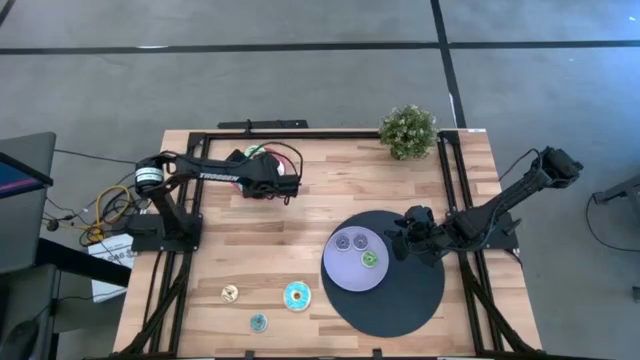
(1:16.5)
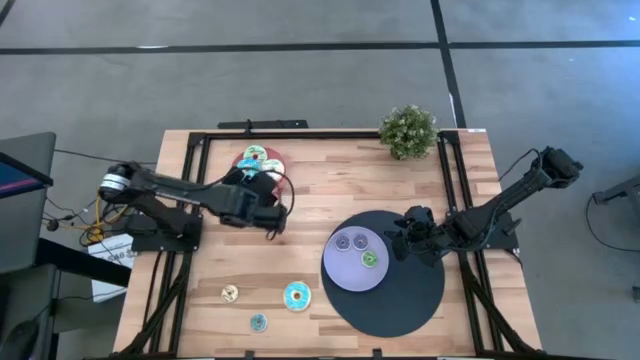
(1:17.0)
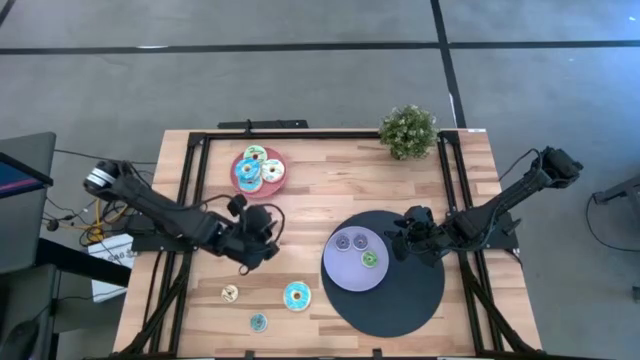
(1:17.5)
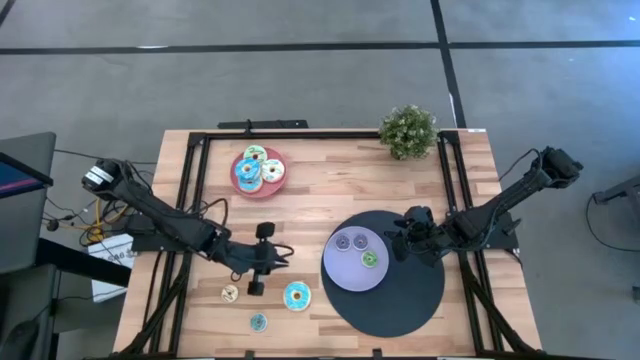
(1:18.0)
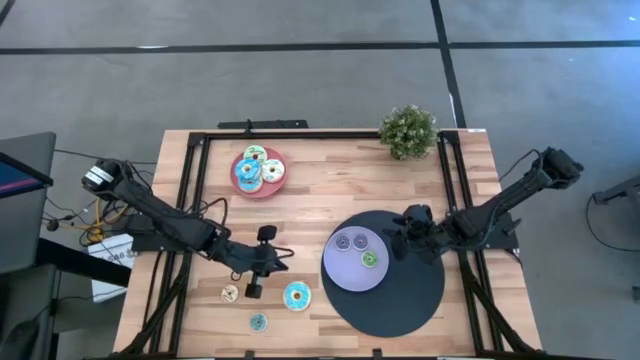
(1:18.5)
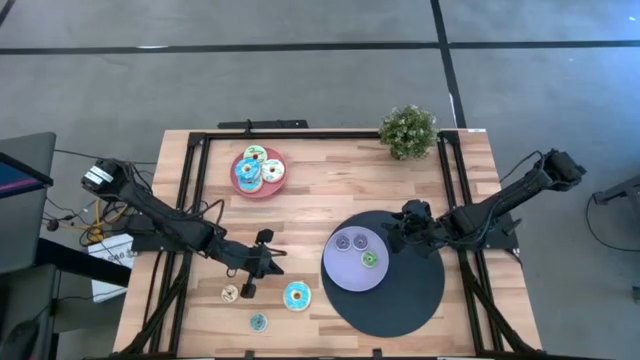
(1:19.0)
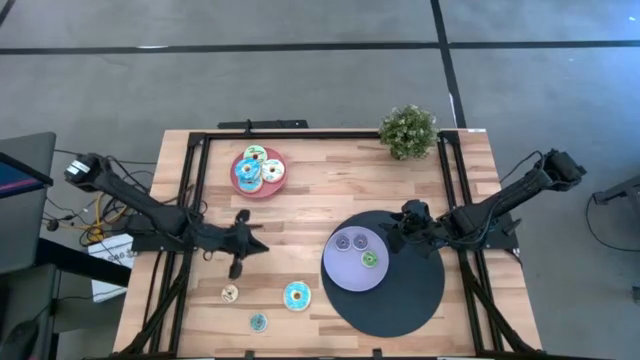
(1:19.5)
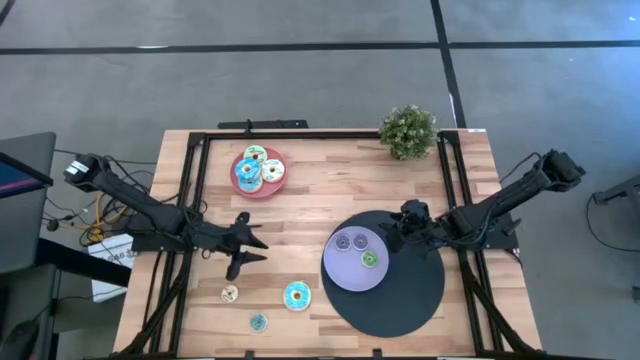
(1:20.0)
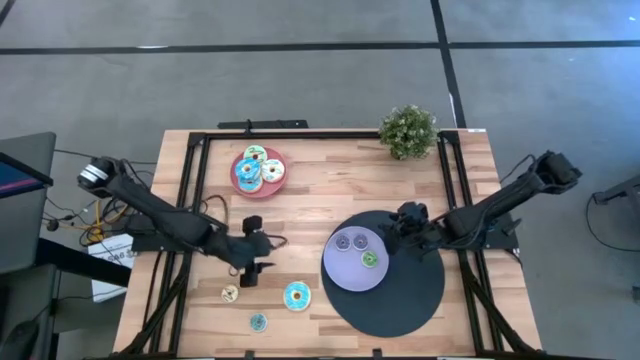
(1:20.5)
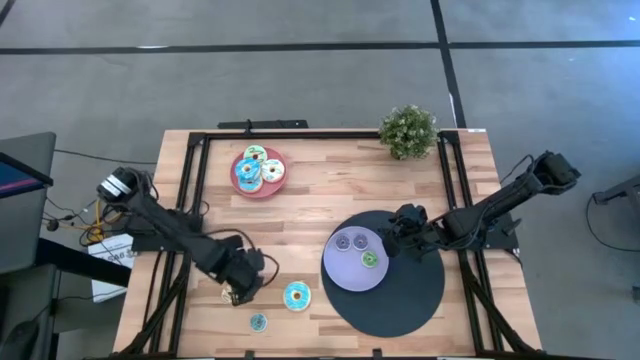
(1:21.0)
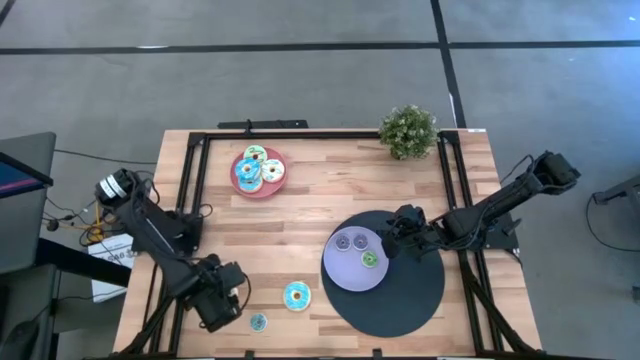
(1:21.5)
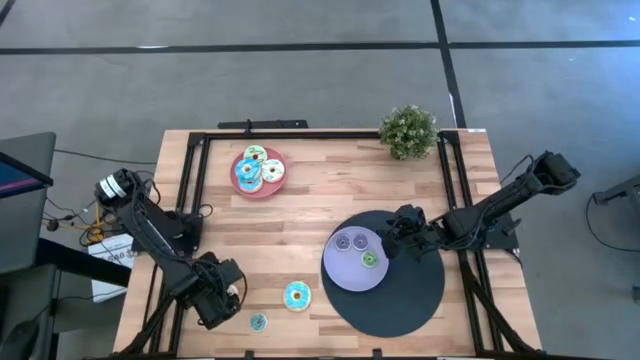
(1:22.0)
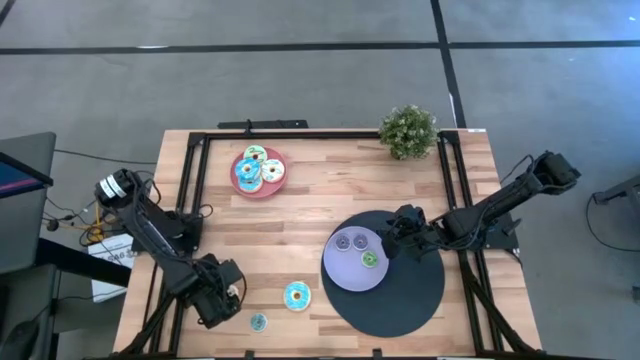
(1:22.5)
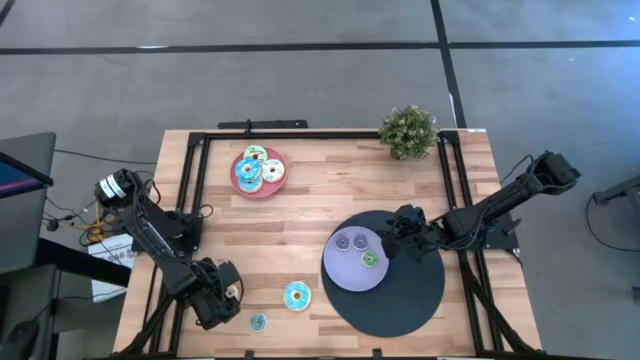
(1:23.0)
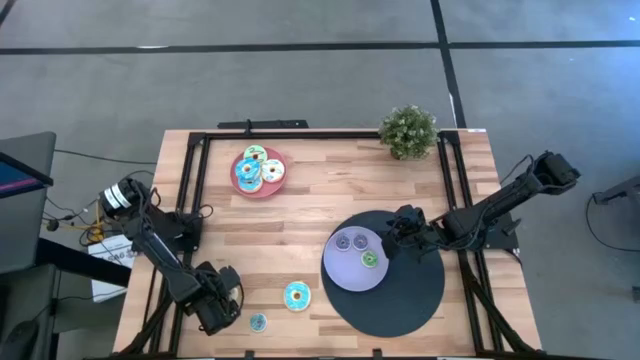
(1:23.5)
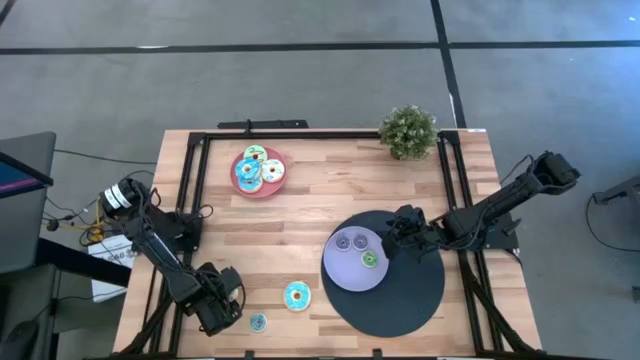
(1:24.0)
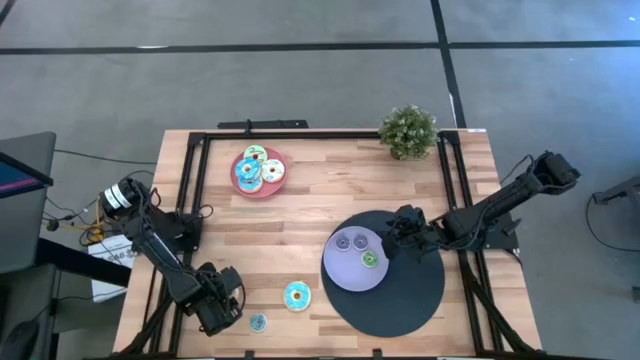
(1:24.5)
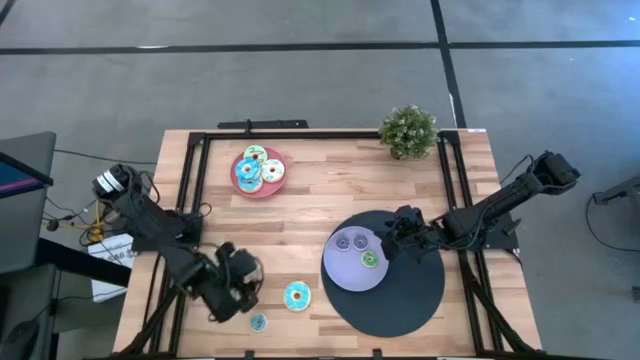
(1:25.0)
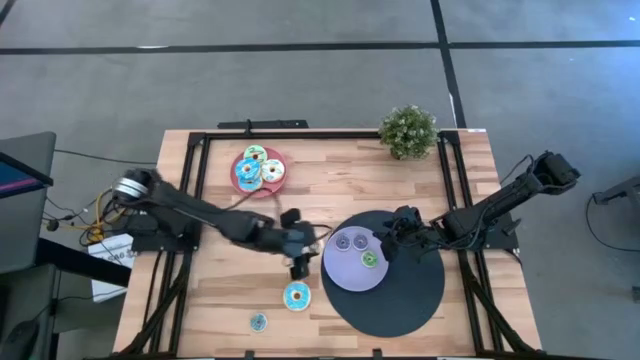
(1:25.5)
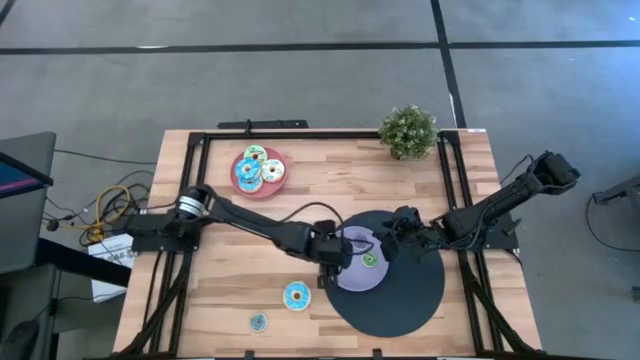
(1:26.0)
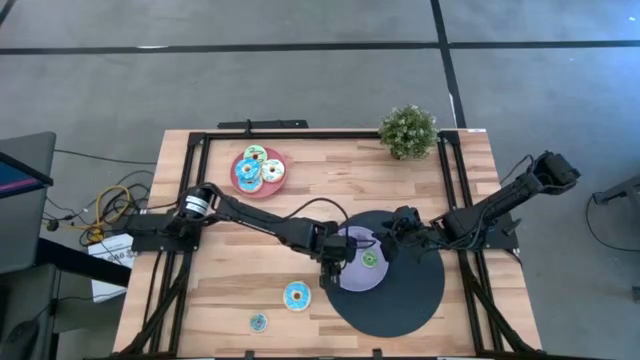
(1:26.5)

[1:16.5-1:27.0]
Task: Pick & Place donuts
Put the small white donut on the purple plate

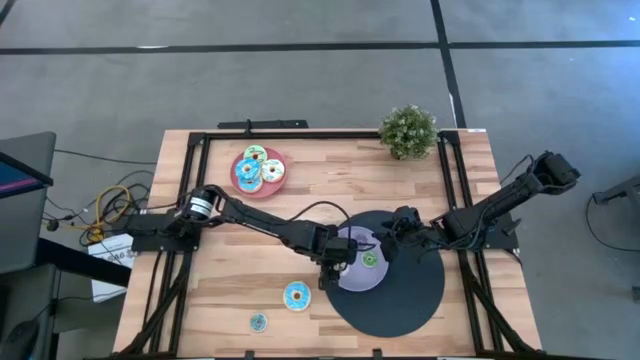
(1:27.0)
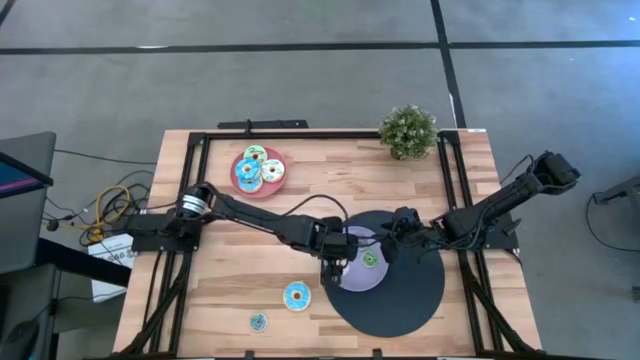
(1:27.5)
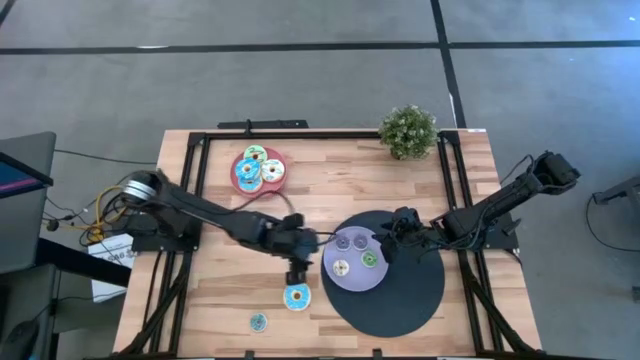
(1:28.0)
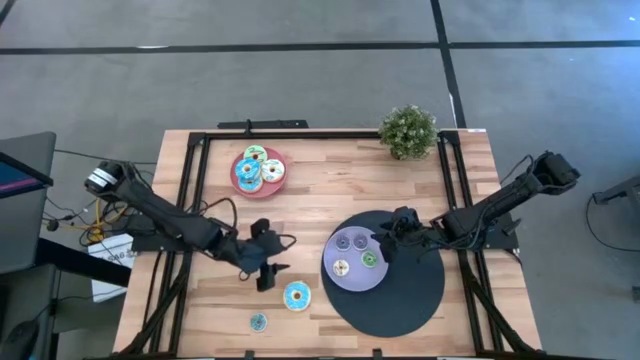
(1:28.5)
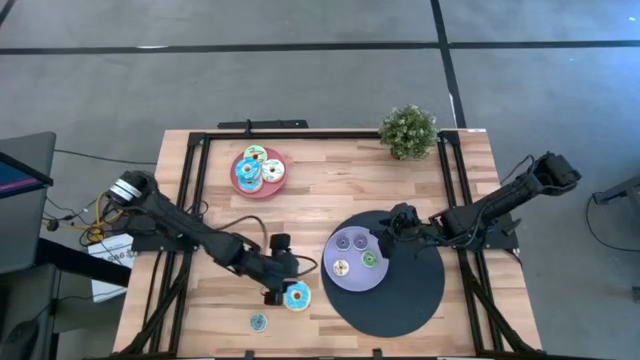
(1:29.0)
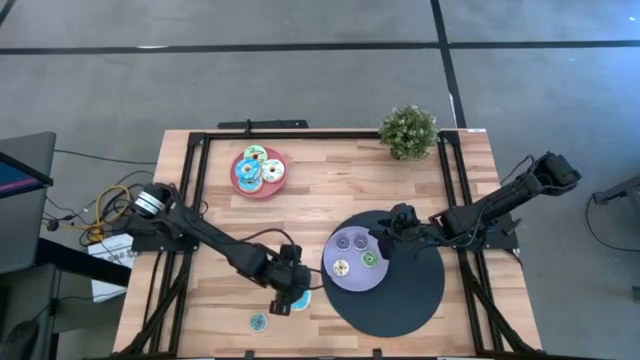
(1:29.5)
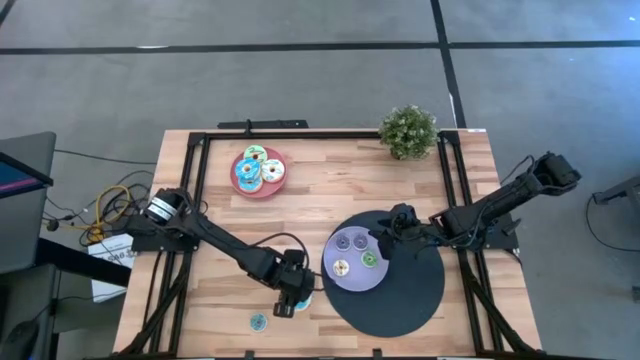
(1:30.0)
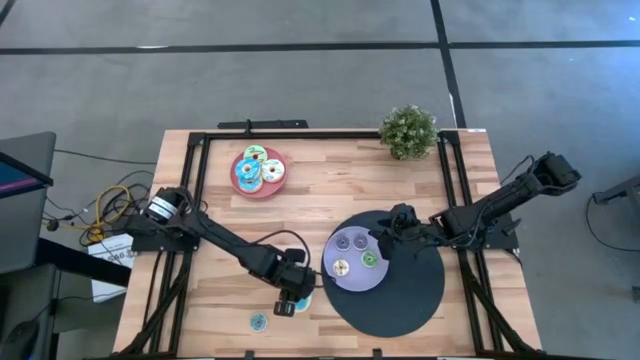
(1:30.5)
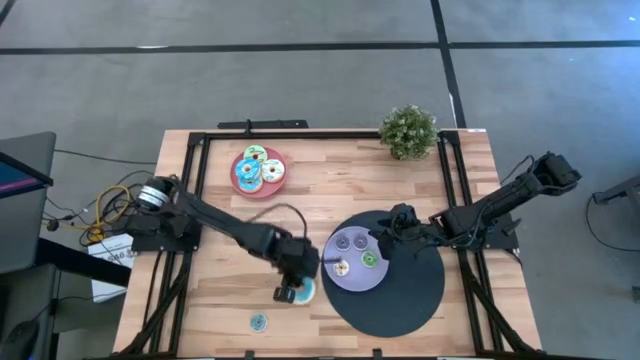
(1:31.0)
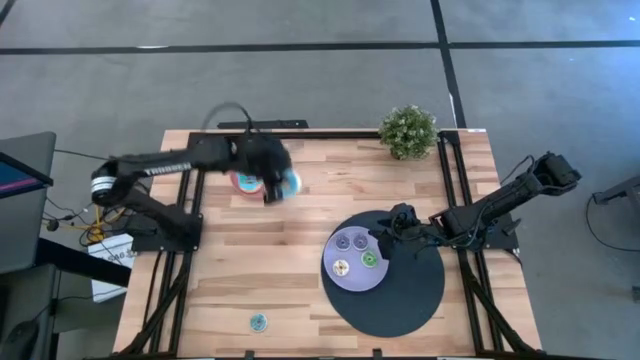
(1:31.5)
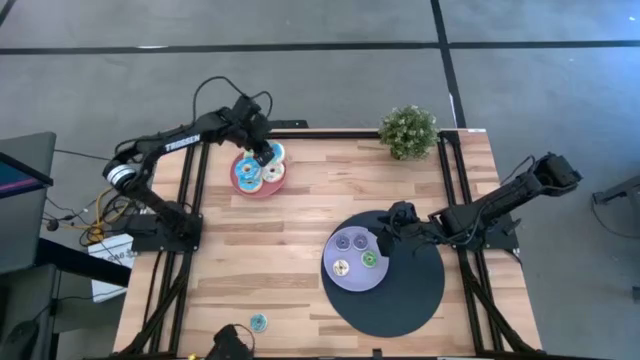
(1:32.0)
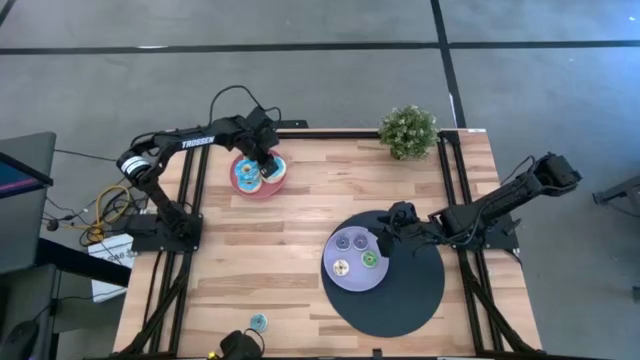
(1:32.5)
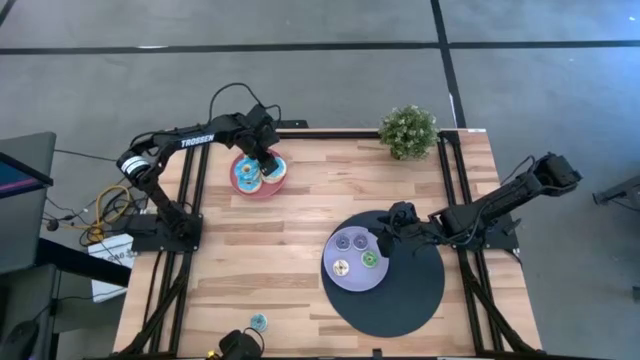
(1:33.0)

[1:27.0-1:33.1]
Put the big blue donut on the pink plate

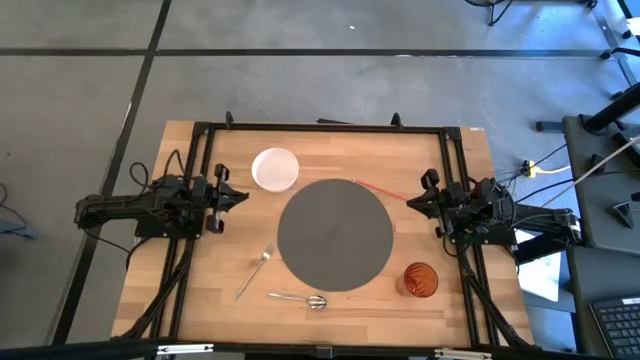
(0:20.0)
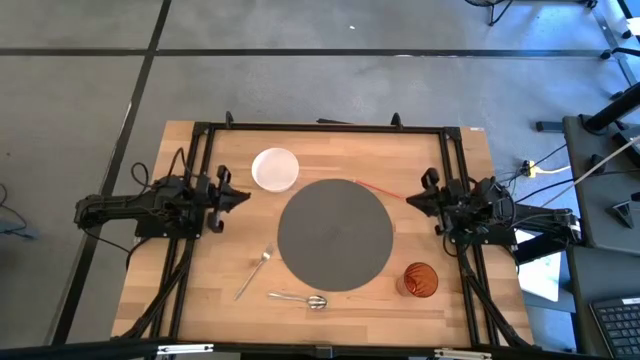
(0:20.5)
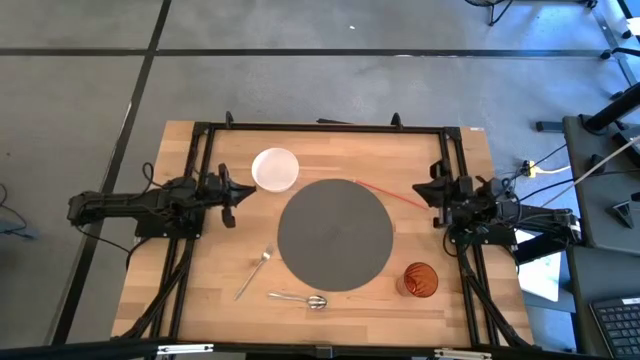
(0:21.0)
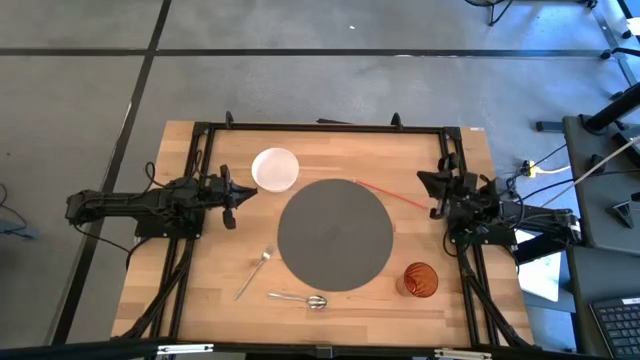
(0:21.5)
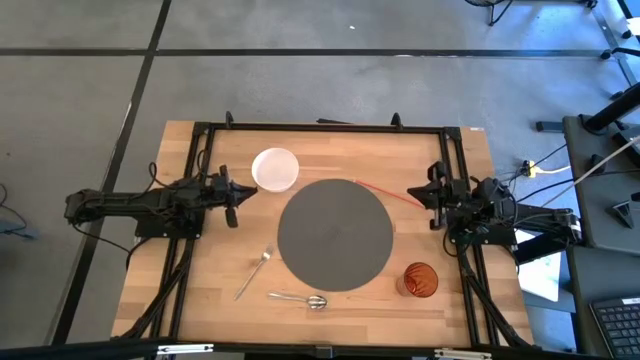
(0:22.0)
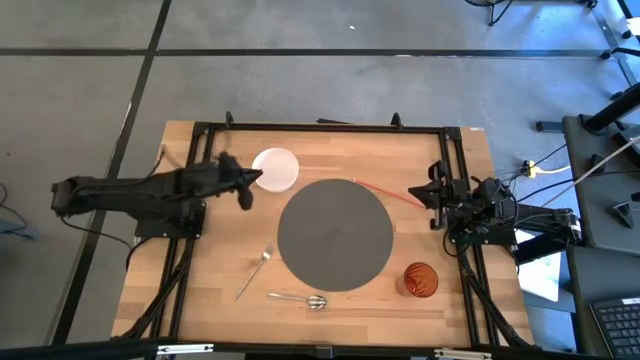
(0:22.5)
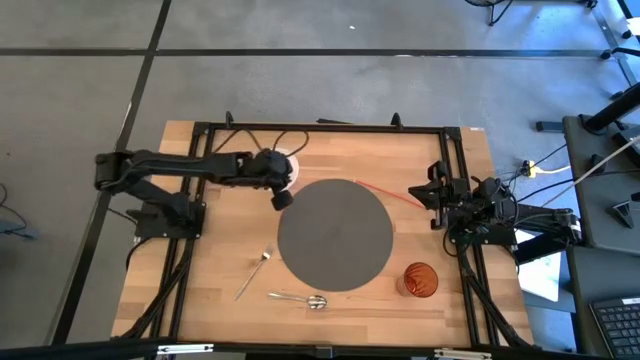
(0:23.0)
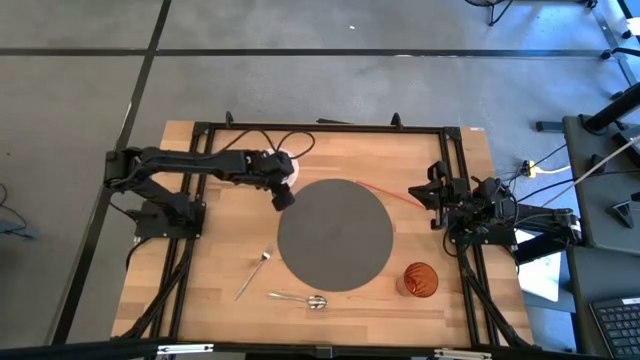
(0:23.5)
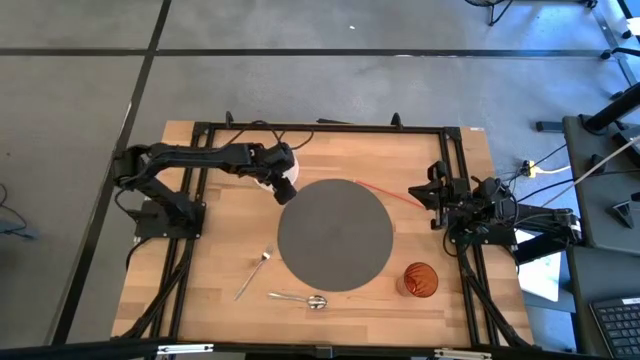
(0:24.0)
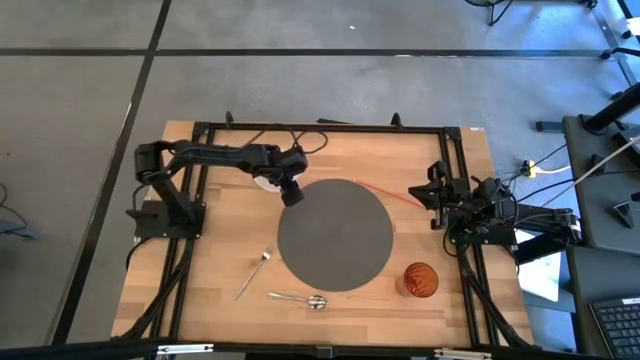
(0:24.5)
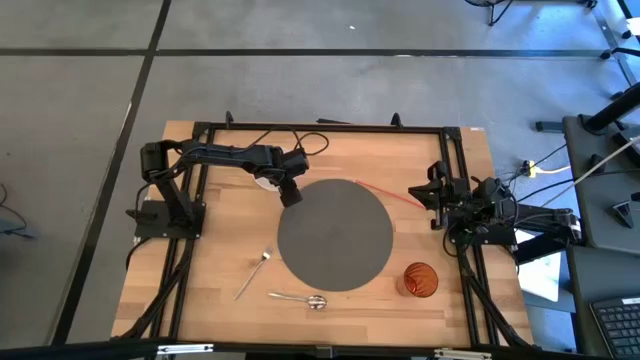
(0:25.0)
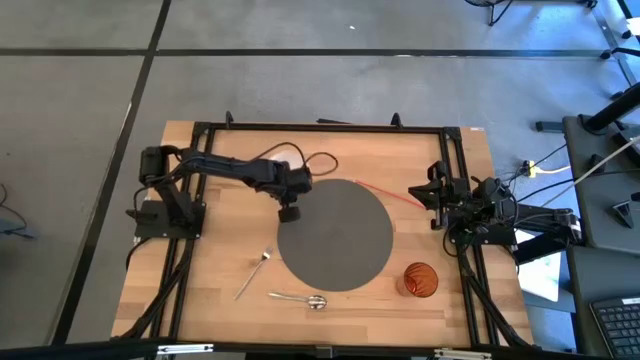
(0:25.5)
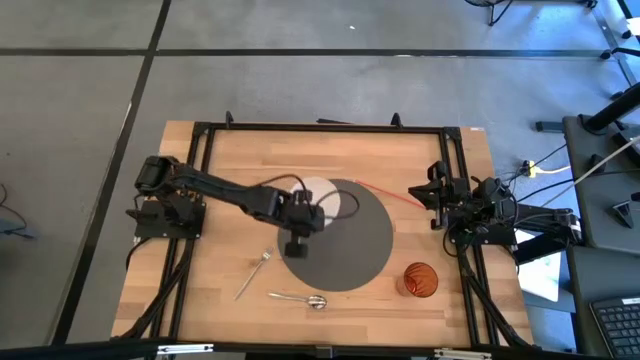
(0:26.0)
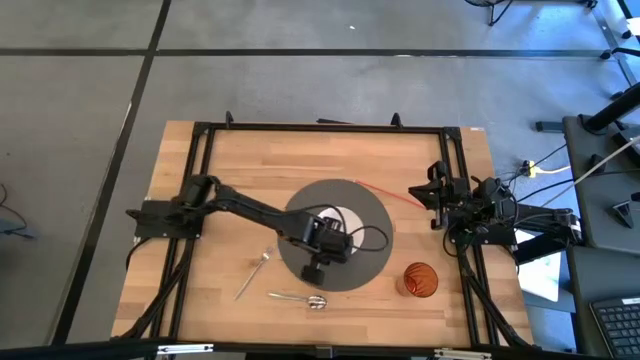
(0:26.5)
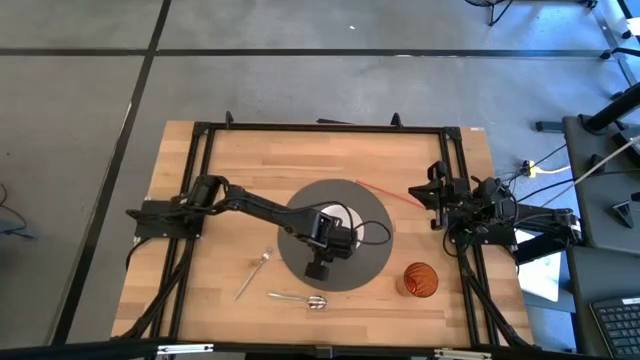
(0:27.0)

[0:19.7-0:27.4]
Task: Pick & Place Utensil
Put the white bowl on the center of the table mat
